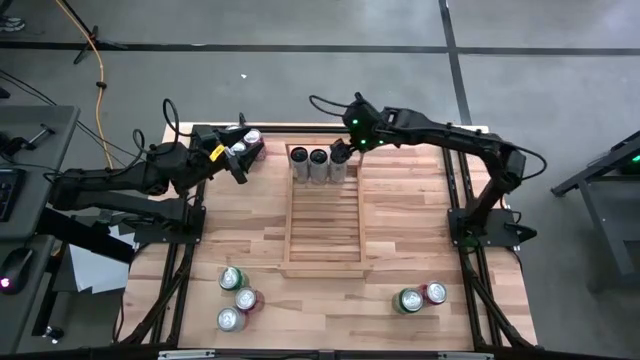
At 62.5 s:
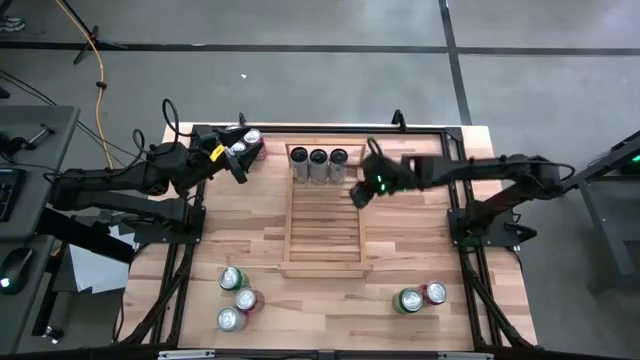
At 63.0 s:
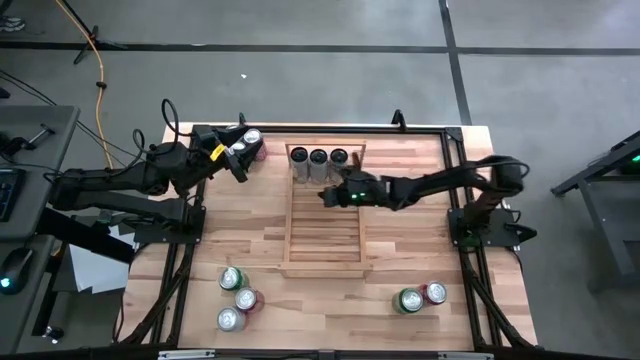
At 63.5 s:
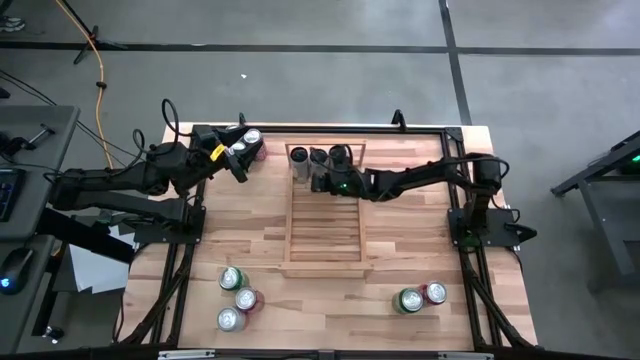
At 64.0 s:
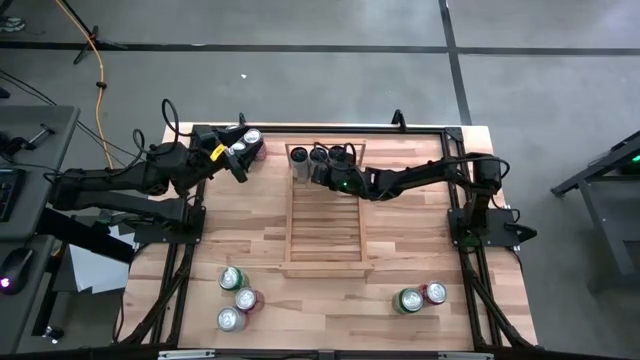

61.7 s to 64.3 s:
Task: Place canned beverage on shelf
Adjust the white and pink can on the shelf

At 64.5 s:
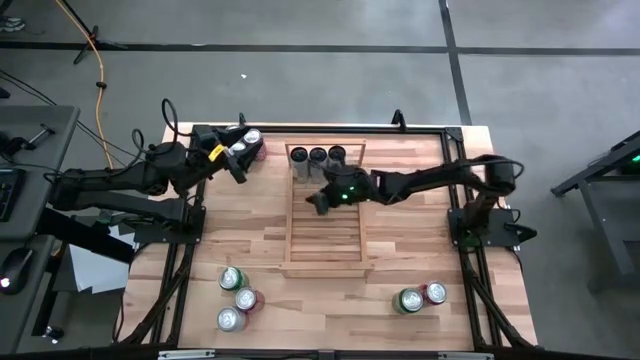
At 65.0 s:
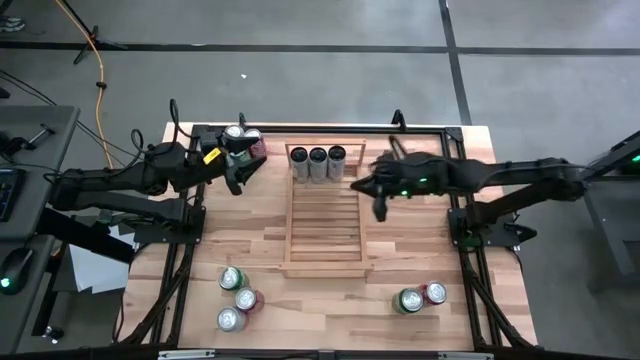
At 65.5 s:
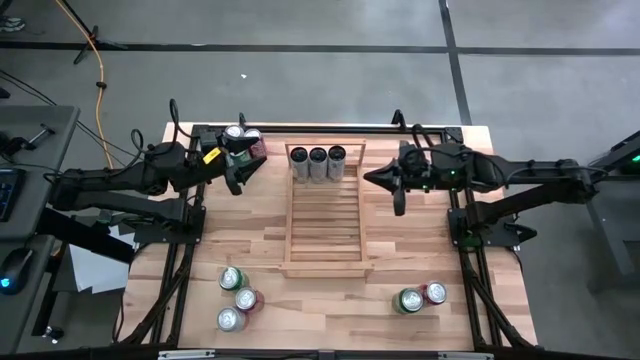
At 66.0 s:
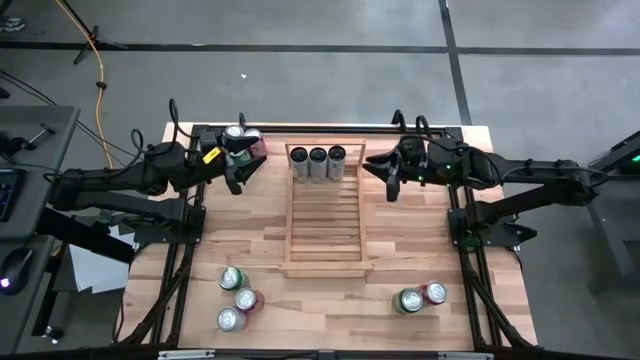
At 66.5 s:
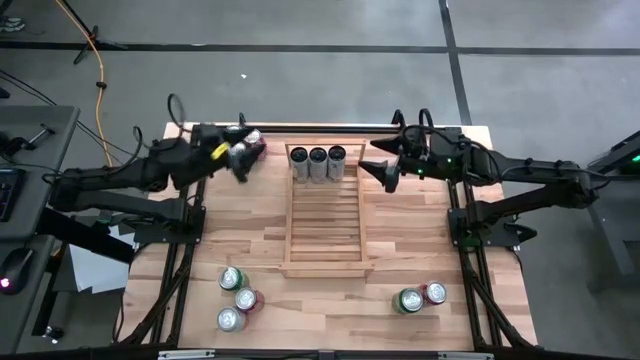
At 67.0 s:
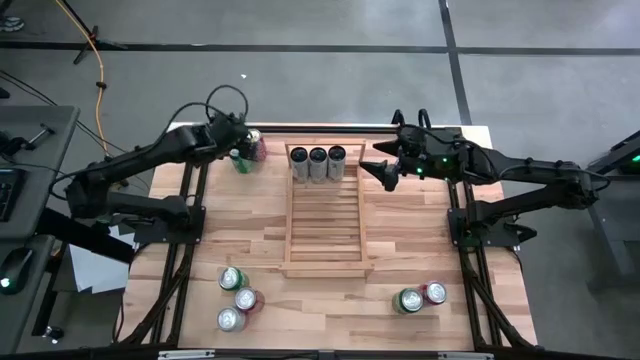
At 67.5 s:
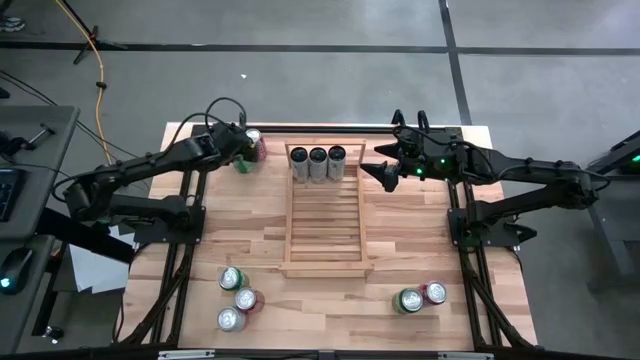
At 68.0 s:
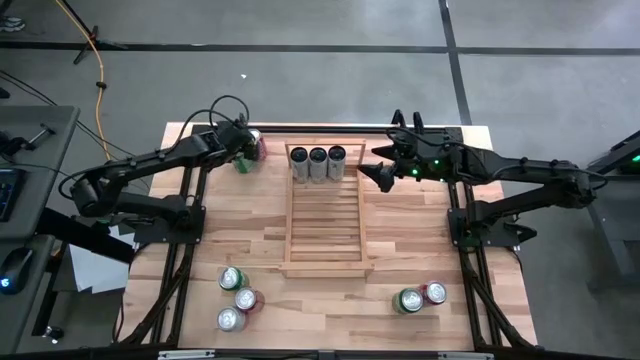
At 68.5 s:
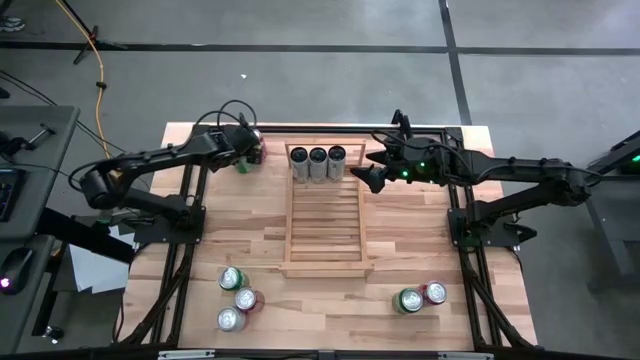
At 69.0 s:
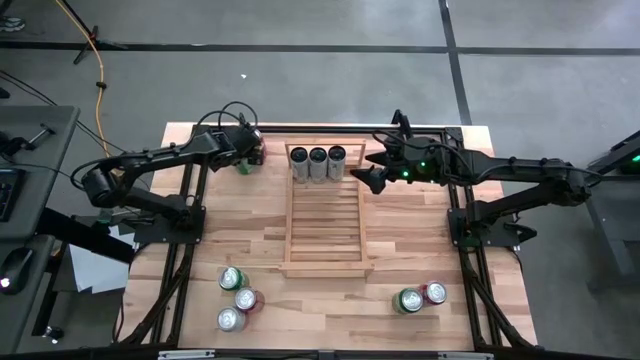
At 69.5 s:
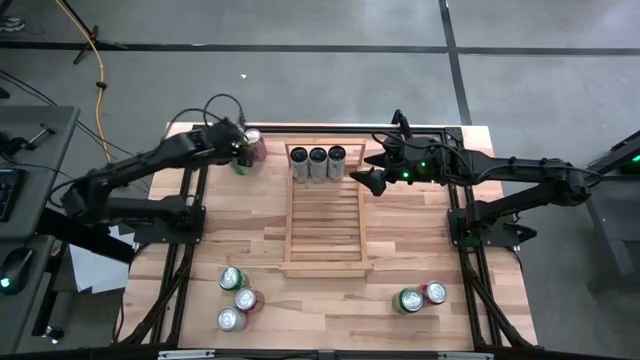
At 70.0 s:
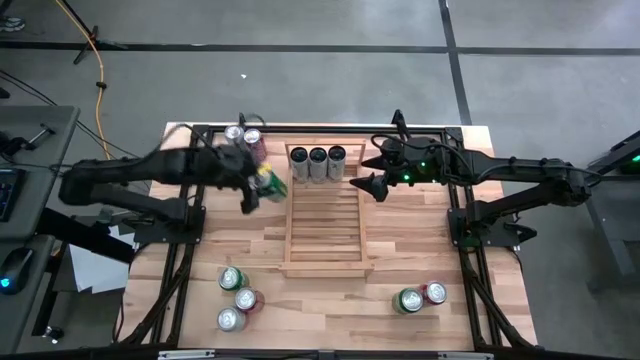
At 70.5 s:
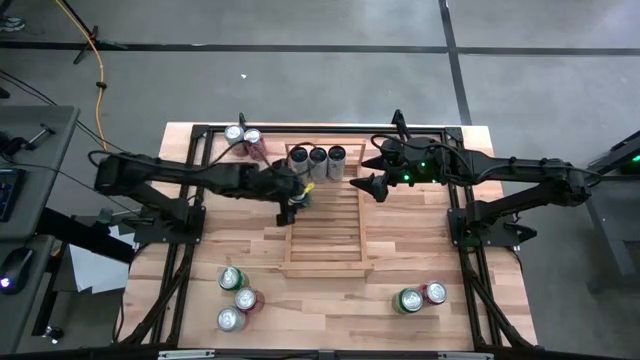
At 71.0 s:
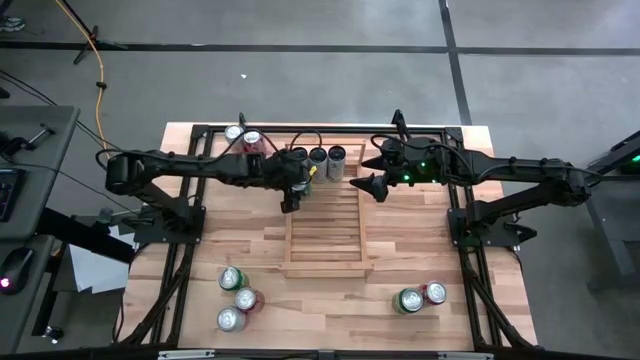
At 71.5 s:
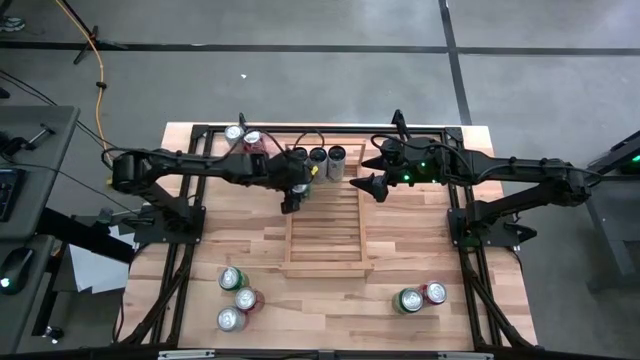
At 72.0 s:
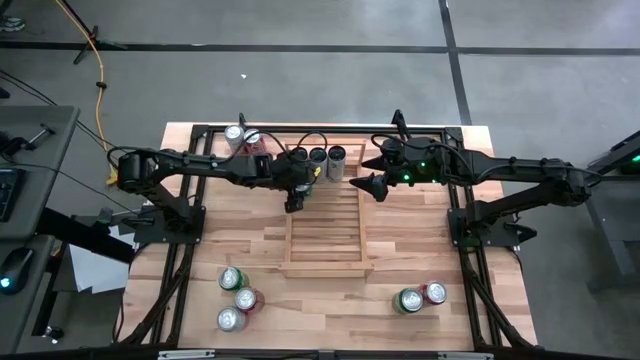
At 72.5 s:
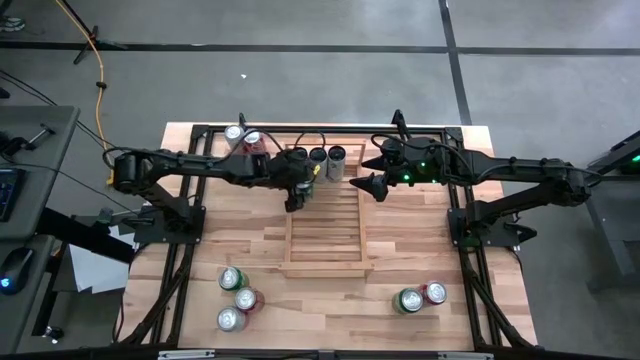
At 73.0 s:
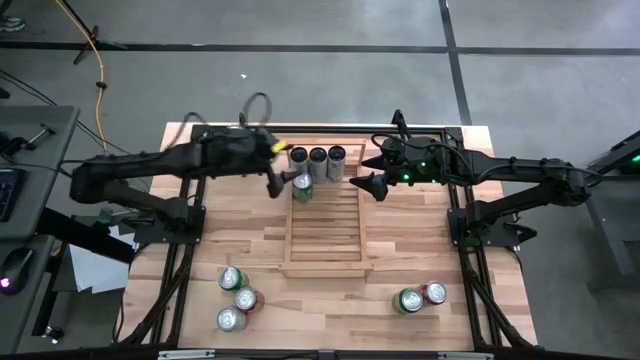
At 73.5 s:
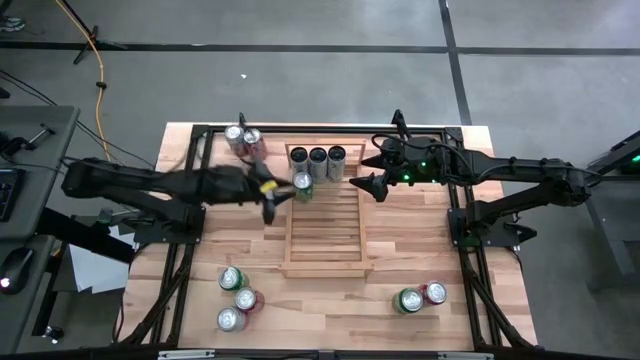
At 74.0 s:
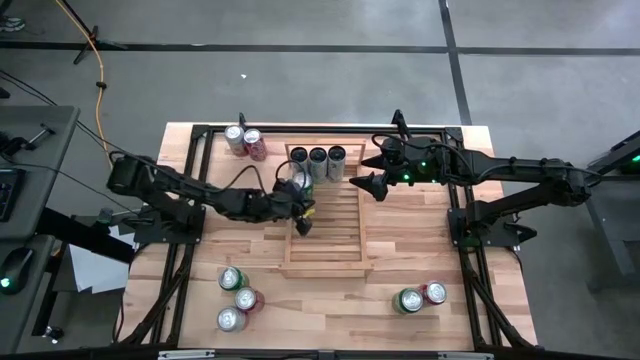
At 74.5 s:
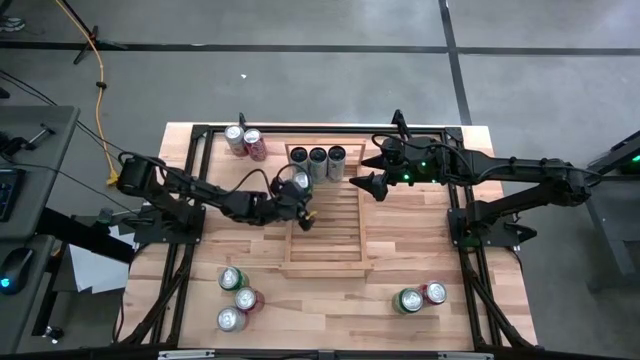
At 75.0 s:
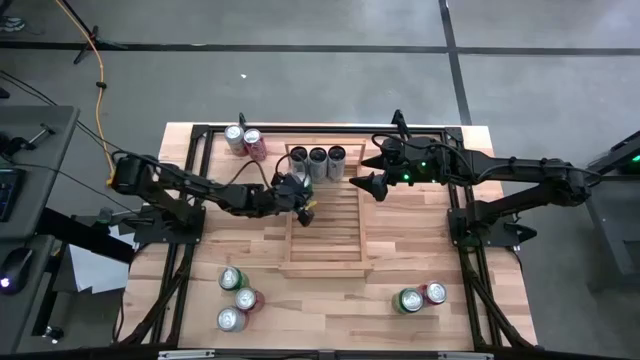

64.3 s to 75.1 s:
Put the top left green can on the shelf

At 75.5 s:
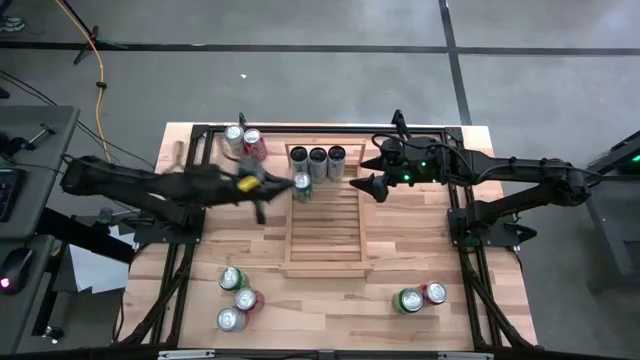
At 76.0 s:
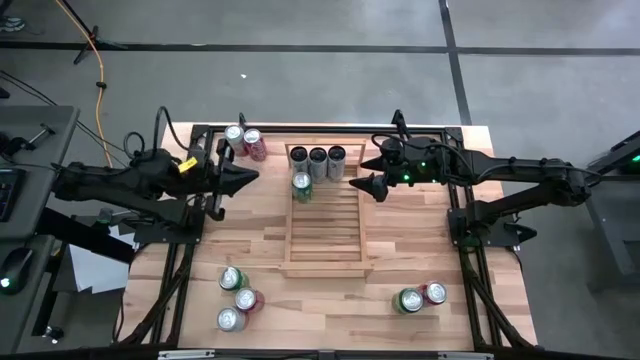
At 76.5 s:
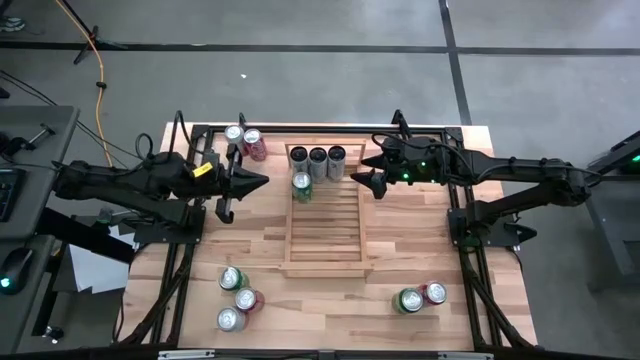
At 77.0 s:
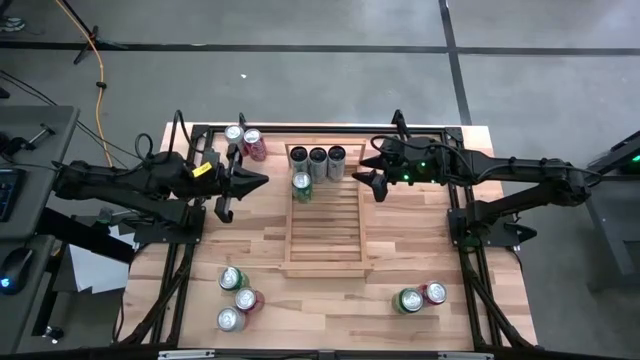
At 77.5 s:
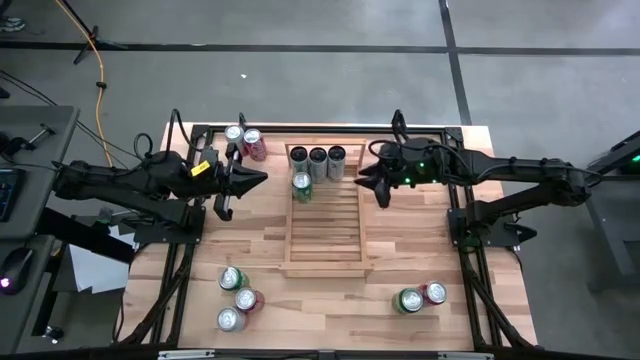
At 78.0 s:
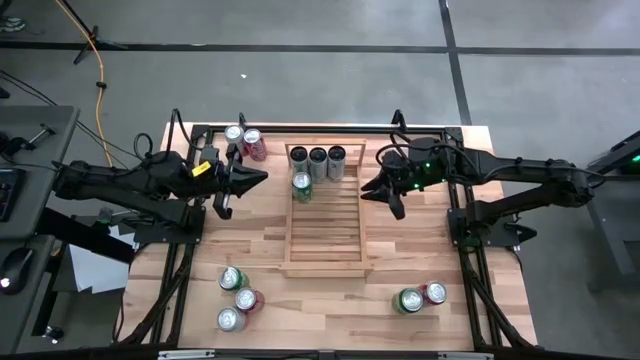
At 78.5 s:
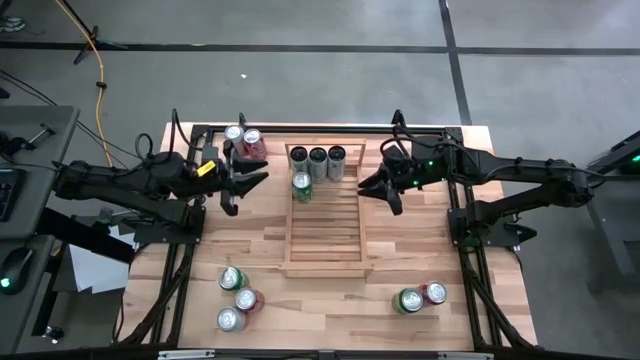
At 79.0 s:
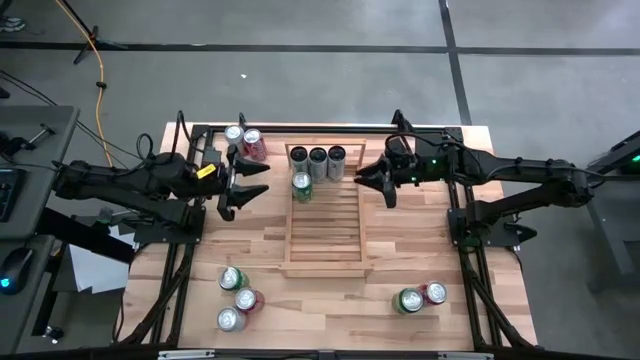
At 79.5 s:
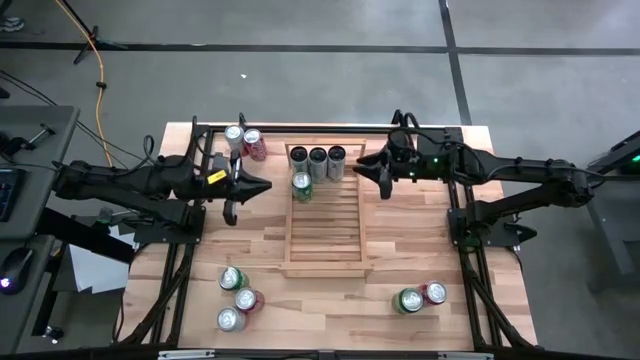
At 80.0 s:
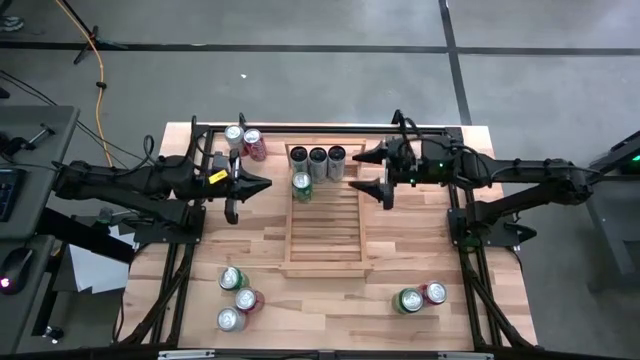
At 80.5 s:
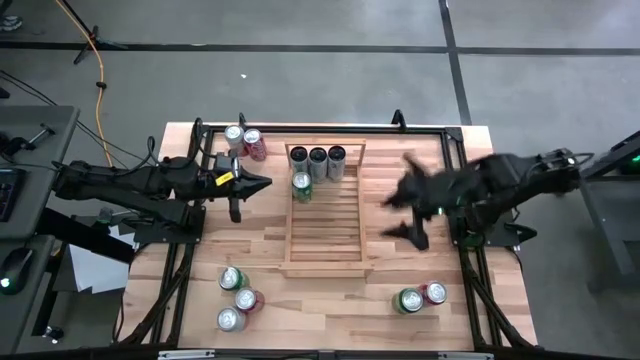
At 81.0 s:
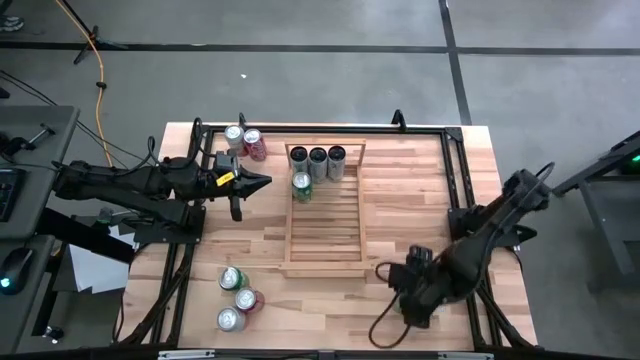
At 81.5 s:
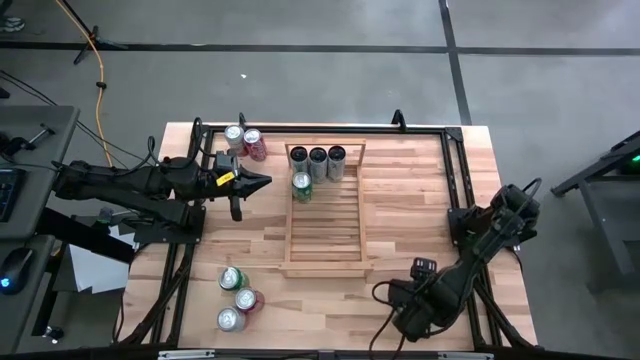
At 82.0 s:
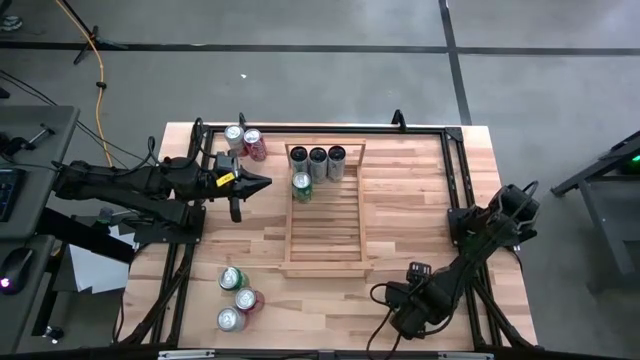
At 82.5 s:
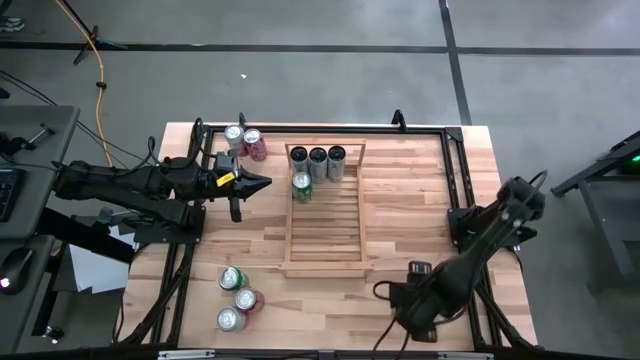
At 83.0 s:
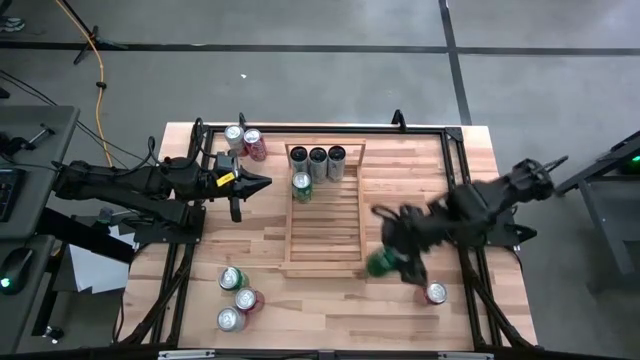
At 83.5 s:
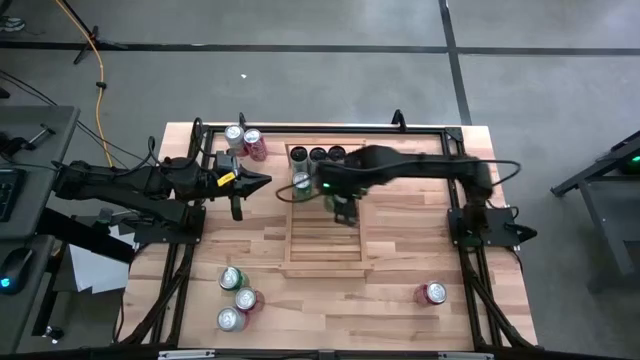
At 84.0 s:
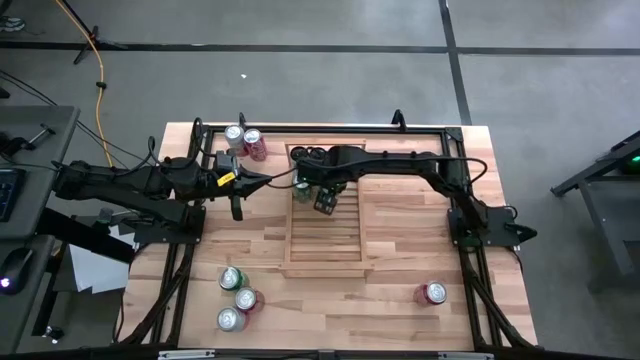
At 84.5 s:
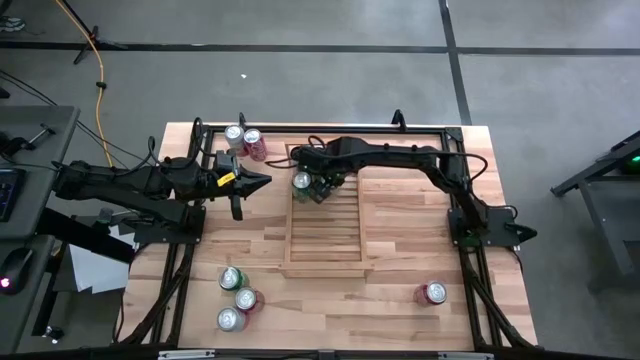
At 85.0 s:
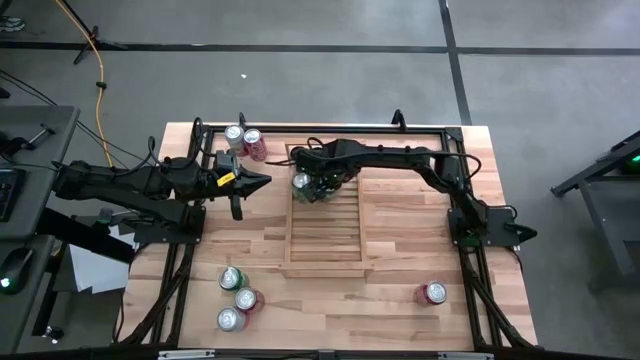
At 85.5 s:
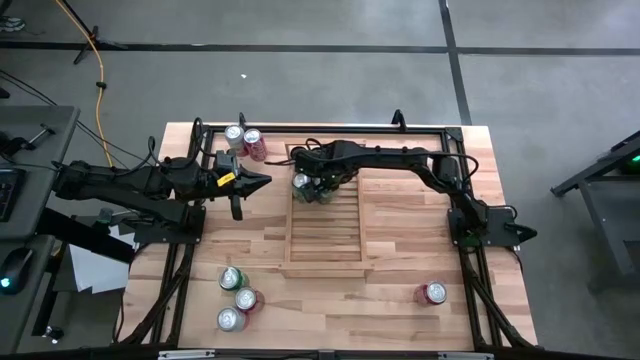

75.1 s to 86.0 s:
Put the right green can on the shelf aligned with the other green can
